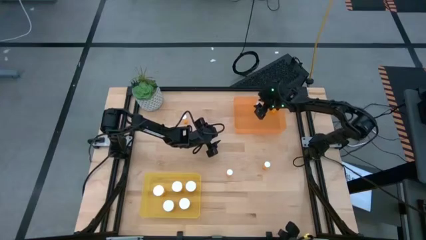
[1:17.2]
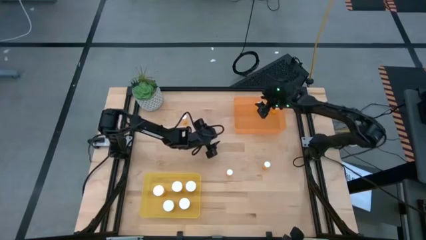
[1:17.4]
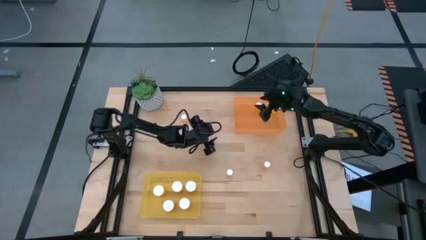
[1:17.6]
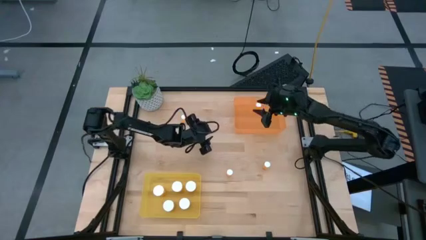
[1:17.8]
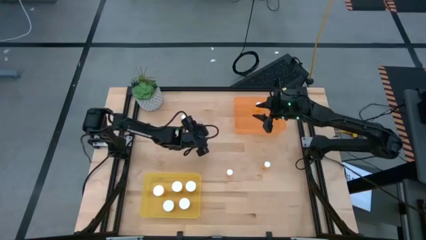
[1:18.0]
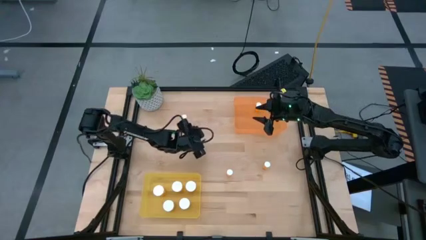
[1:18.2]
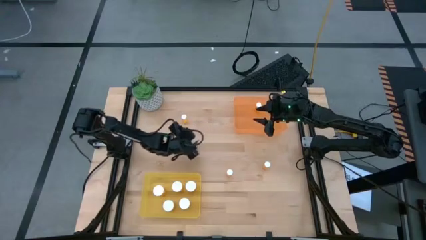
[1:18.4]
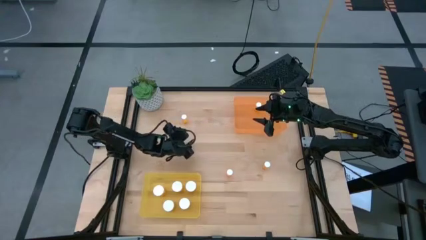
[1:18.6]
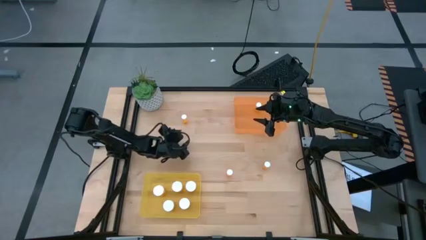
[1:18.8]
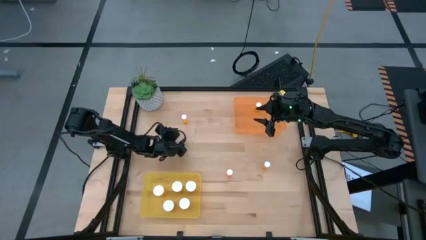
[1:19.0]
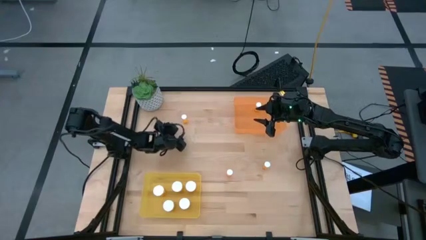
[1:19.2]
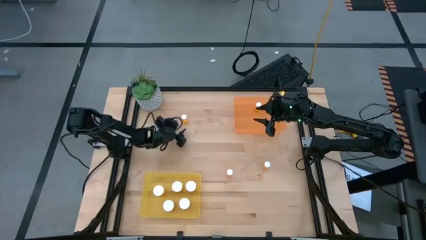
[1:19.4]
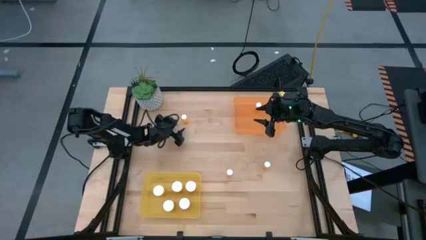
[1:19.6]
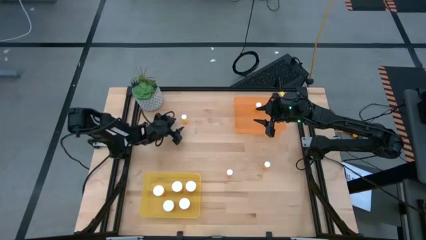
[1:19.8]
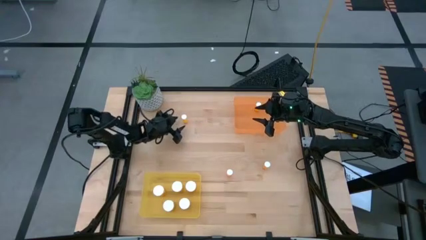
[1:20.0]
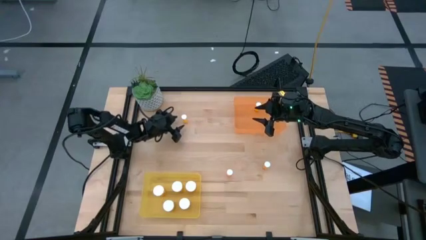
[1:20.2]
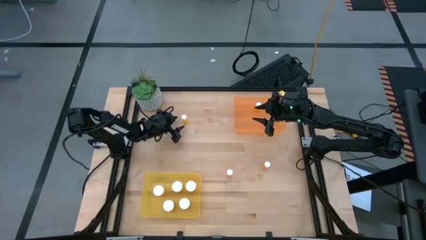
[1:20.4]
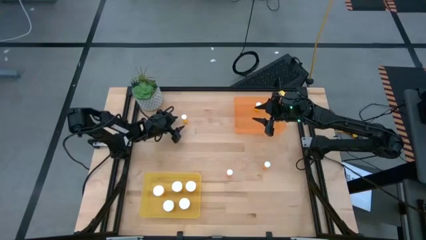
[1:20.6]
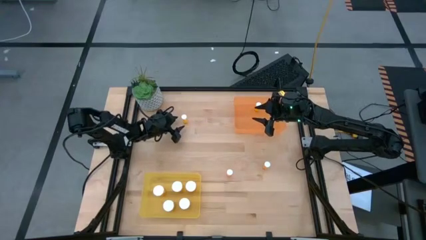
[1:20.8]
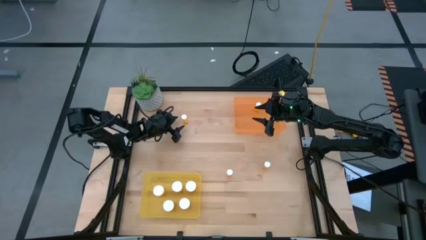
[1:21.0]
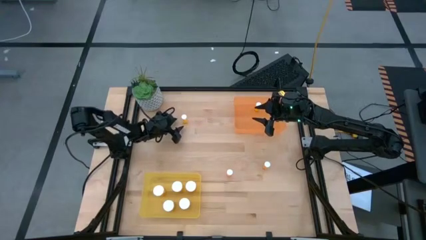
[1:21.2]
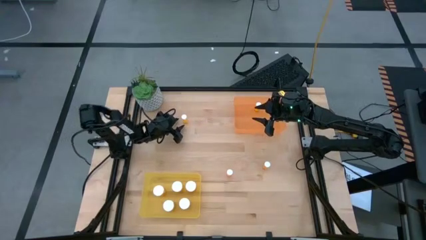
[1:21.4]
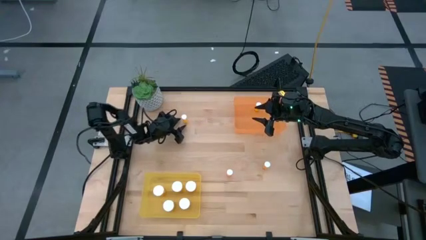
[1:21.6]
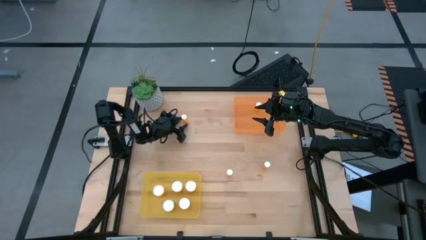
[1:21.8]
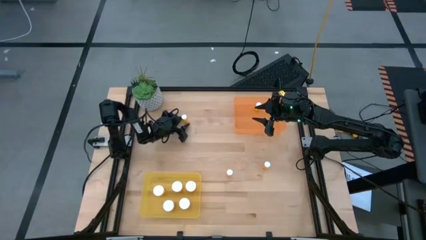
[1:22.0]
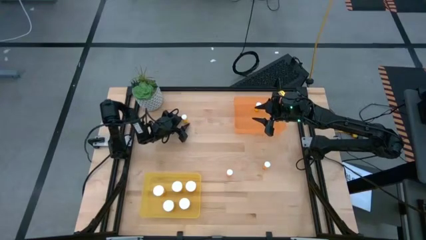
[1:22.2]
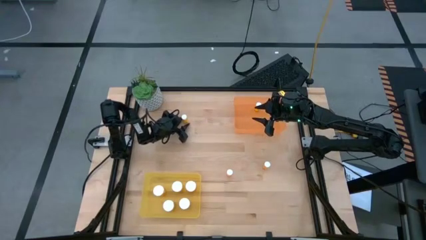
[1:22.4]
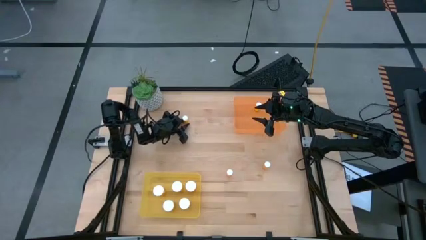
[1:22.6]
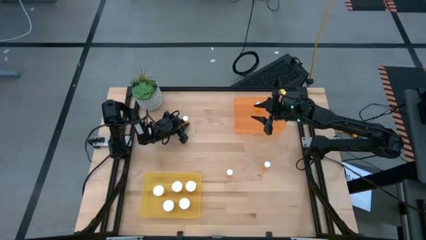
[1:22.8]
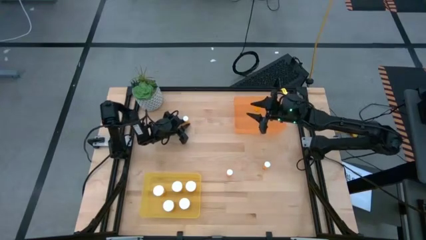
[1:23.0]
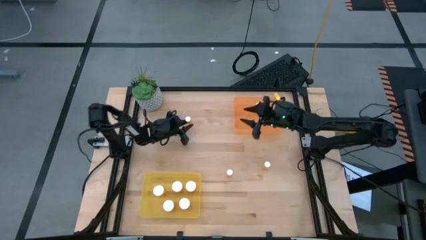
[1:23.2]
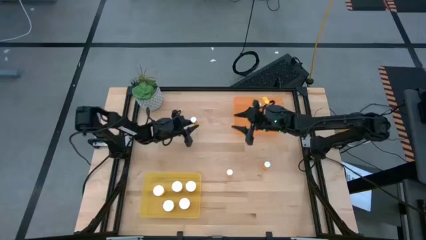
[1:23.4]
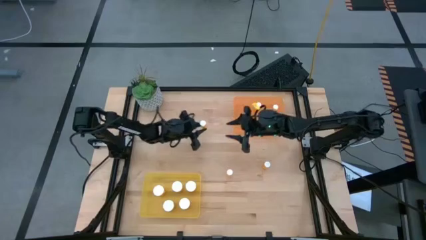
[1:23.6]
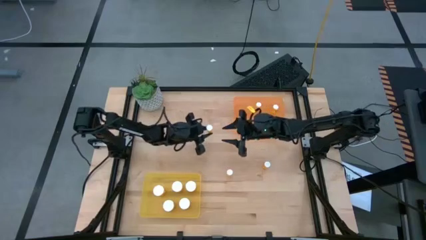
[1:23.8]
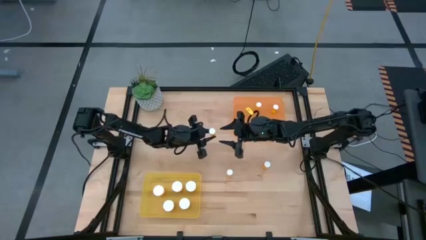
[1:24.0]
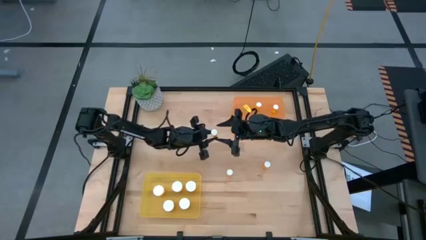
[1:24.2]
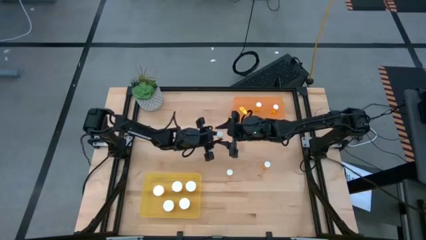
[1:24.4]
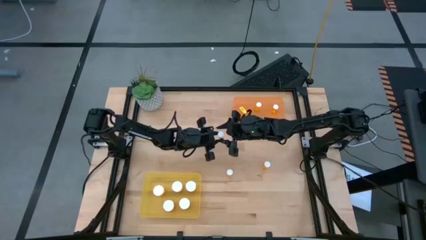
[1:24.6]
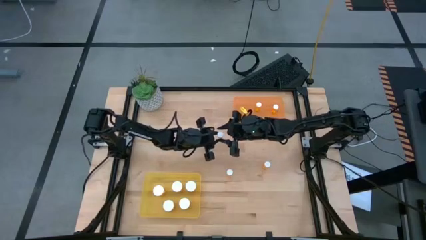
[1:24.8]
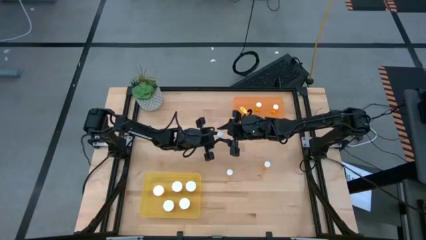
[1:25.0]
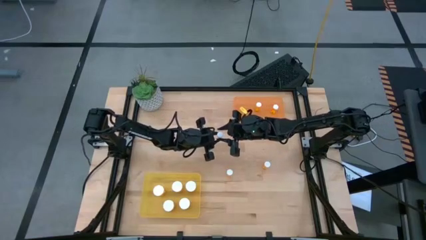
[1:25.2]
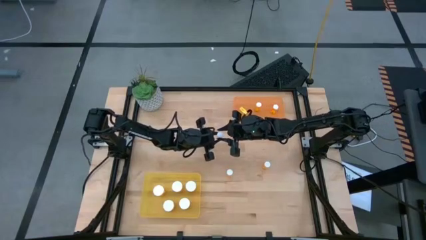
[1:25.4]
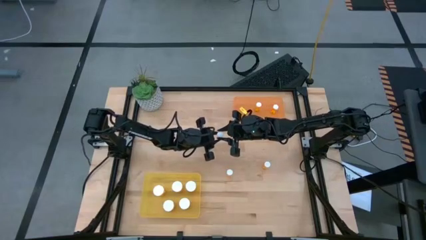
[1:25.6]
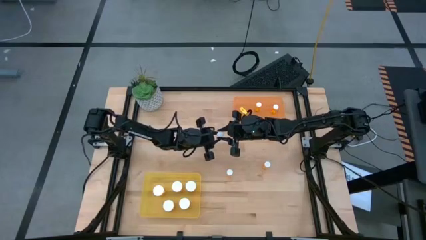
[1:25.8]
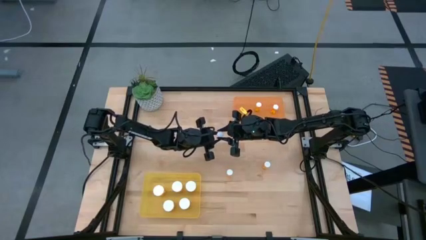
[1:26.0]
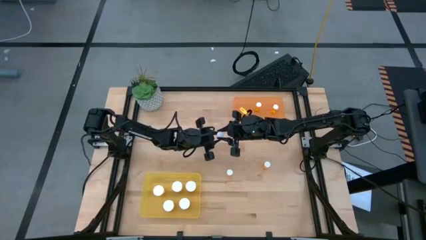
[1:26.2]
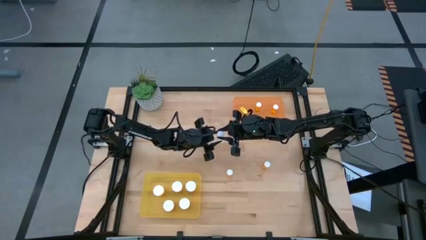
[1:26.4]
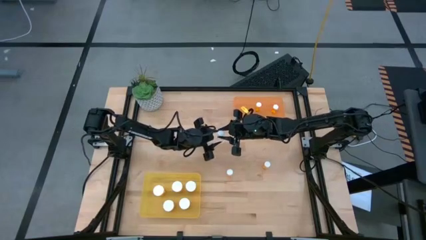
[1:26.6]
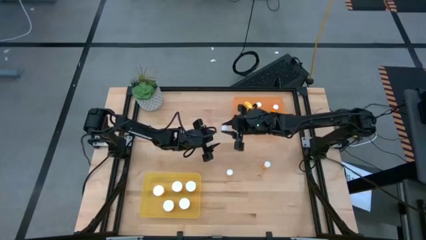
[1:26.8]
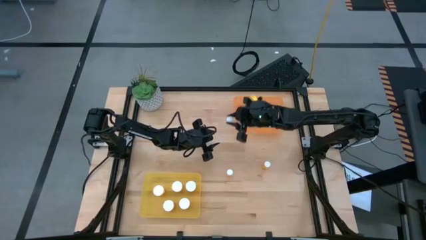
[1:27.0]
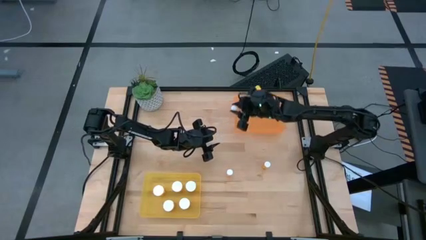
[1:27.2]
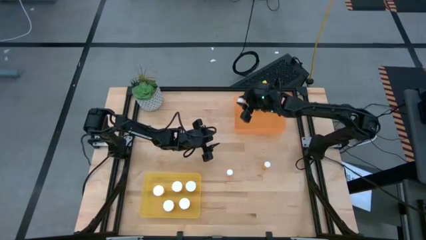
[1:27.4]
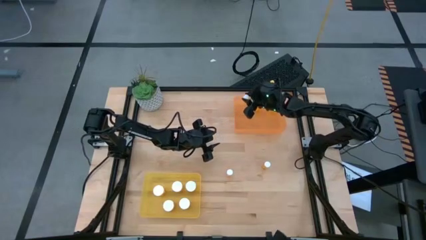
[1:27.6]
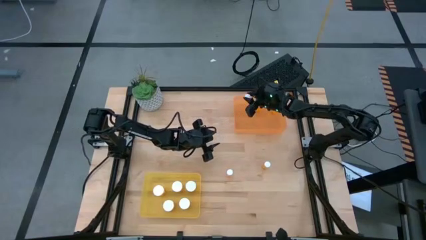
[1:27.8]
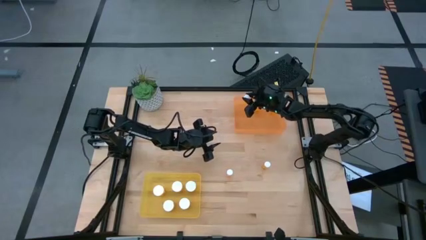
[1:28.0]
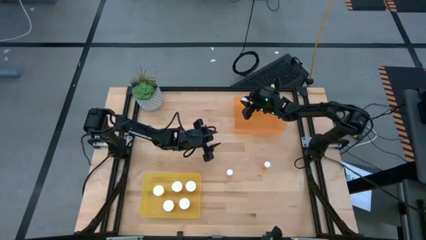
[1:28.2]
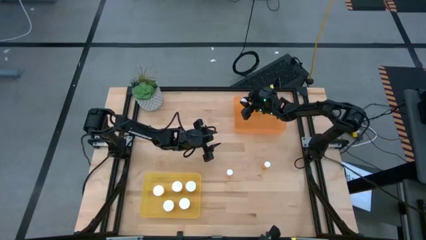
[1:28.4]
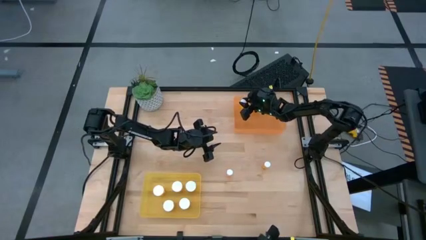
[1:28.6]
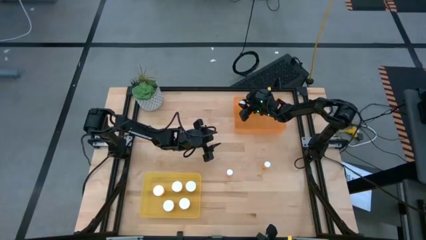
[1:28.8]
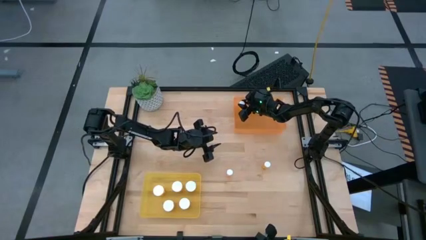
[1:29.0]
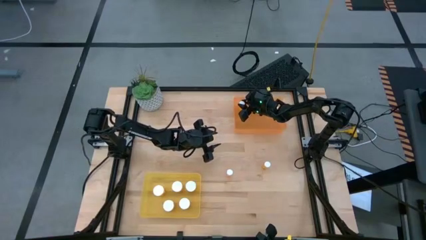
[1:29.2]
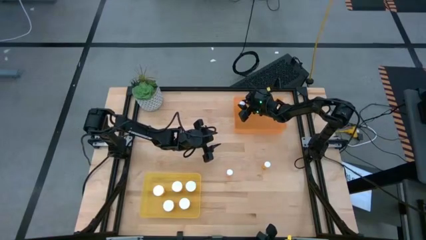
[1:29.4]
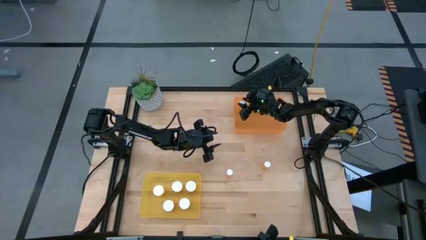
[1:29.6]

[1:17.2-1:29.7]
Task: Pick and place medicine bottles into bin by pill shape (circle, oval)
Put the small pill bottle into the orange bin

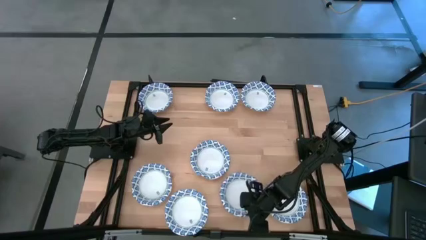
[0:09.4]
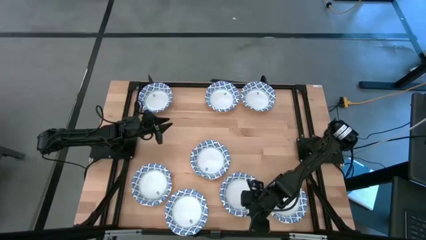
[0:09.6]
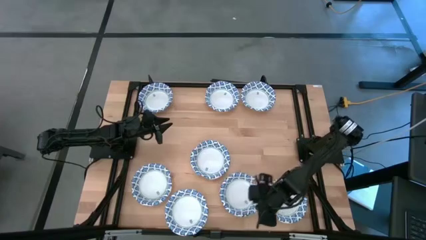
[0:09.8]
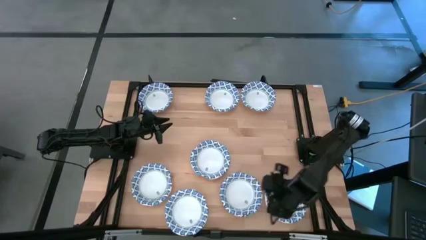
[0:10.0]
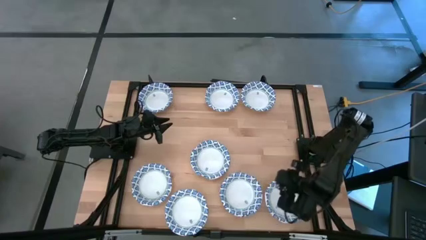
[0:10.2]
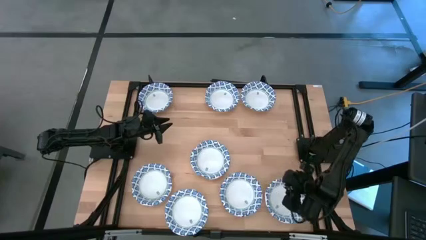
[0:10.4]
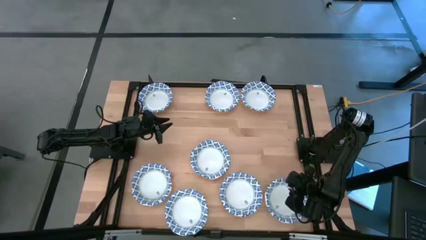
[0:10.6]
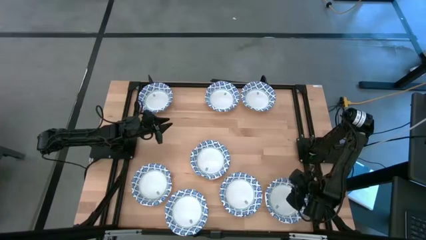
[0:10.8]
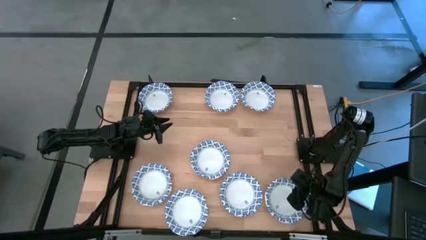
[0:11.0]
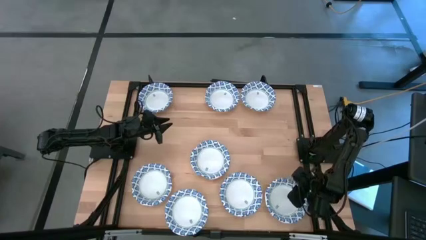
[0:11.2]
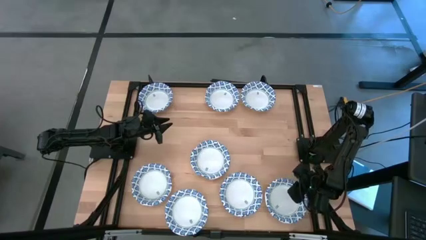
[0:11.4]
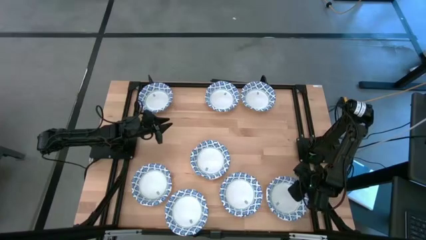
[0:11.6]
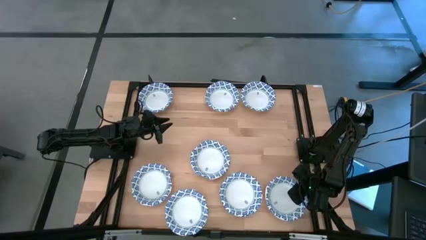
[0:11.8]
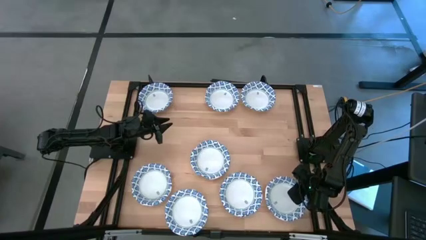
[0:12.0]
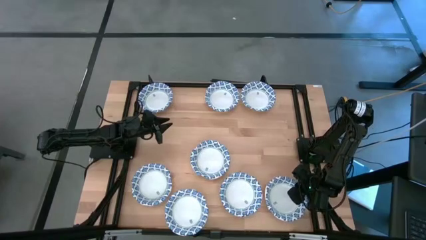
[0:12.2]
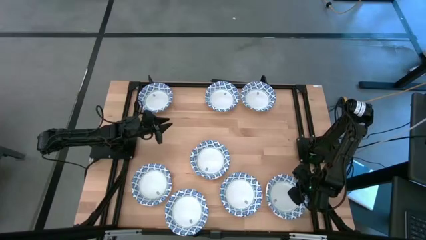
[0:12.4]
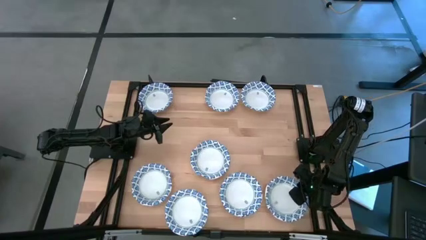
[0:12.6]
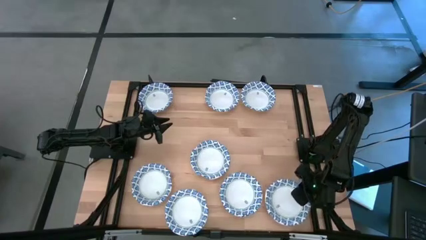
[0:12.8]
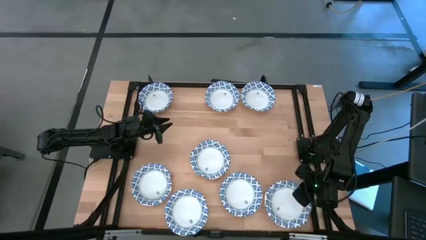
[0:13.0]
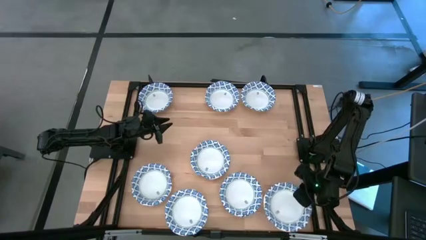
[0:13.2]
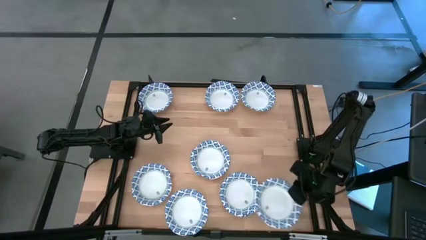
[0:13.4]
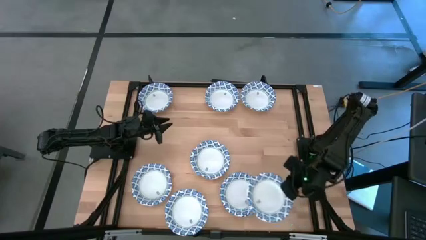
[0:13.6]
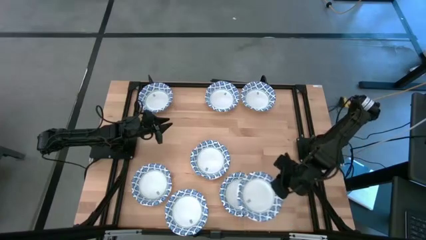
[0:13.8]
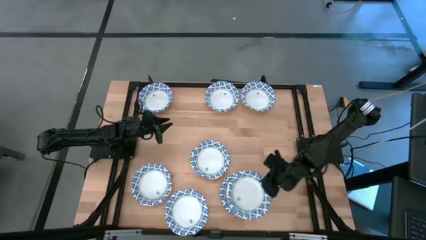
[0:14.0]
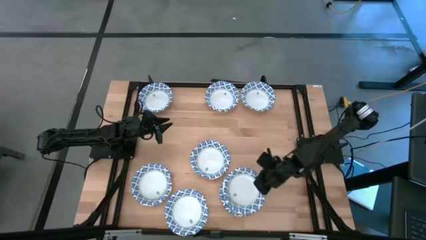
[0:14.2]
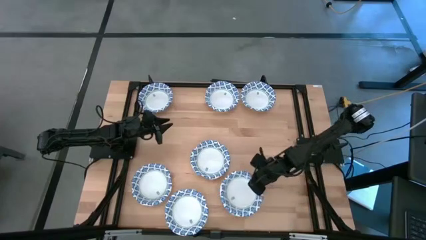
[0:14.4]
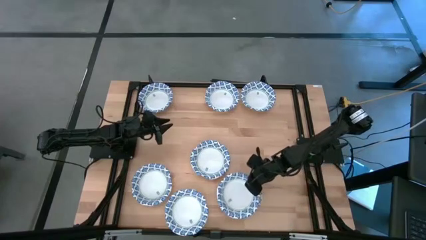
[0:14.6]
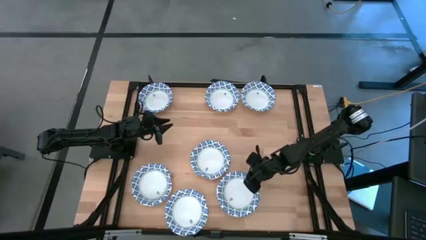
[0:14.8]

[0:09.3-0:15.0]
Task: Nest bowls inside each other
Stack the blue patterned bowl on the blue patterned bowls
